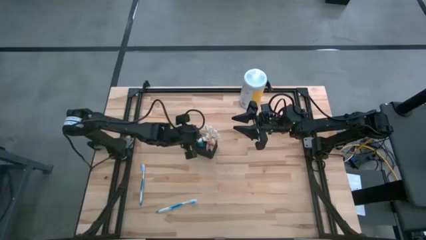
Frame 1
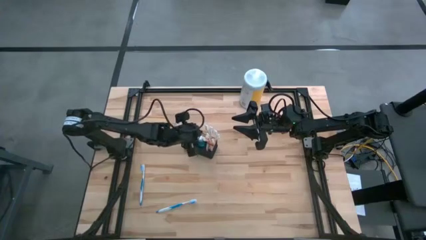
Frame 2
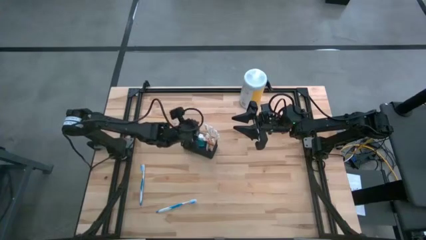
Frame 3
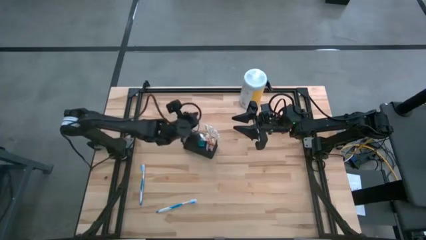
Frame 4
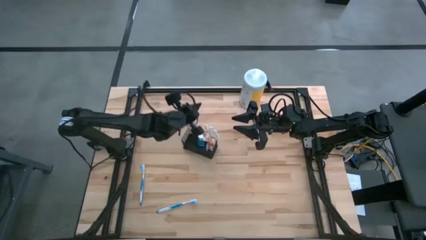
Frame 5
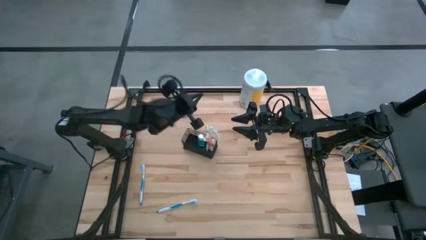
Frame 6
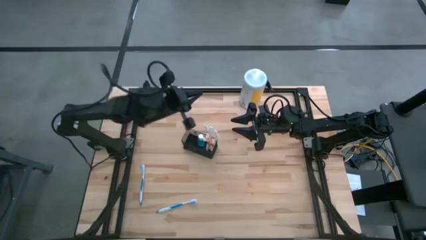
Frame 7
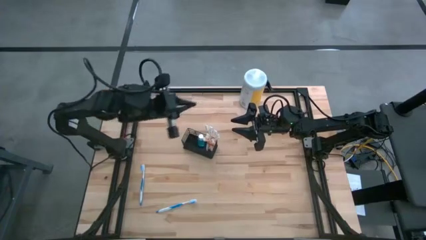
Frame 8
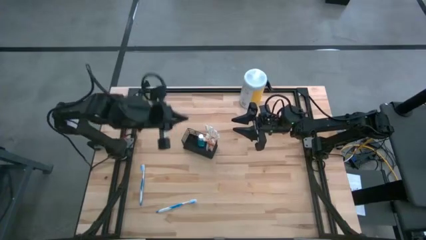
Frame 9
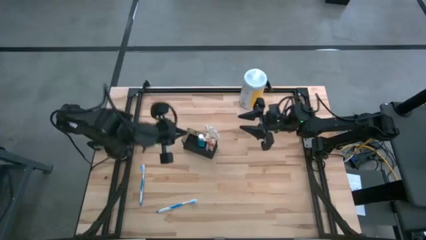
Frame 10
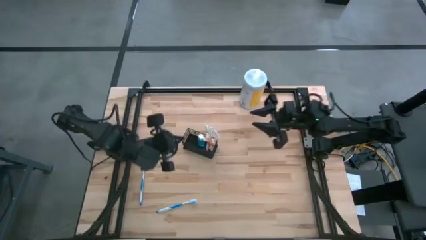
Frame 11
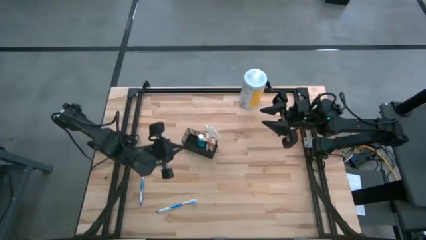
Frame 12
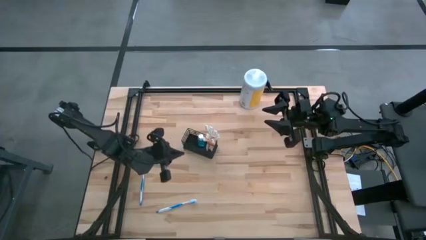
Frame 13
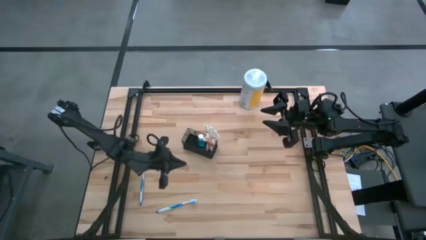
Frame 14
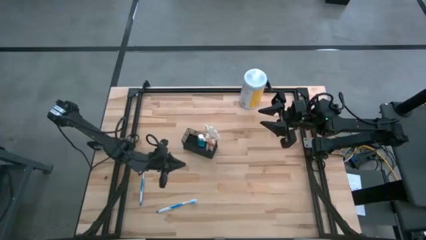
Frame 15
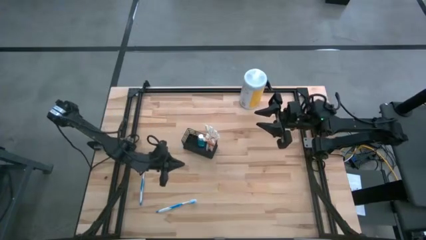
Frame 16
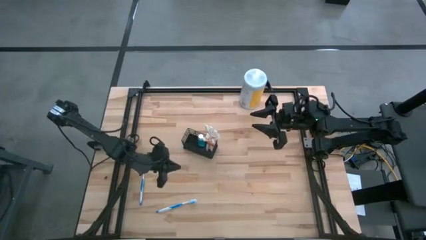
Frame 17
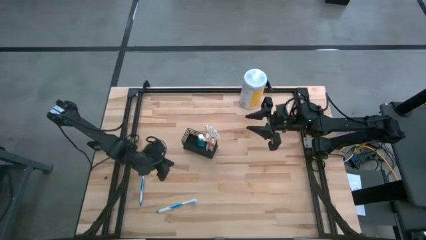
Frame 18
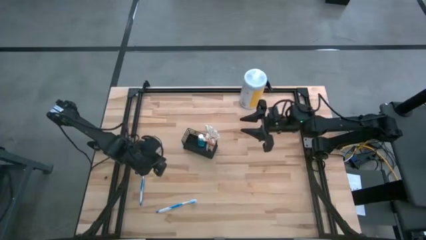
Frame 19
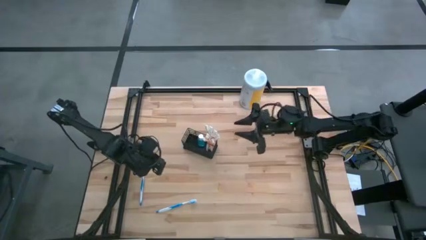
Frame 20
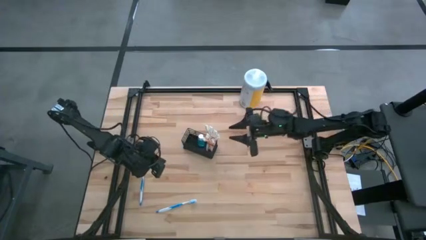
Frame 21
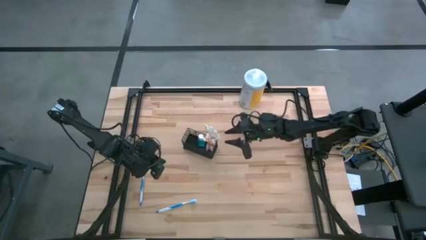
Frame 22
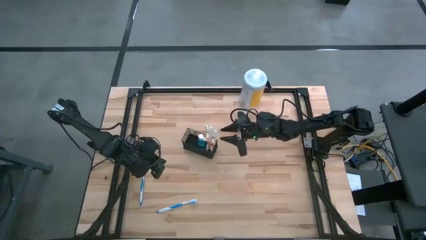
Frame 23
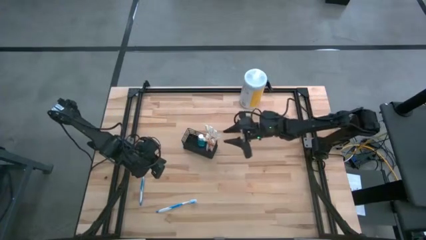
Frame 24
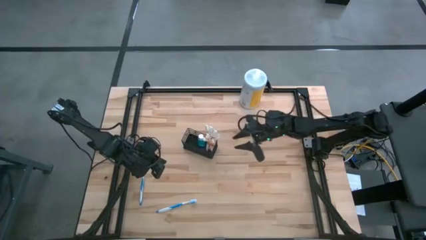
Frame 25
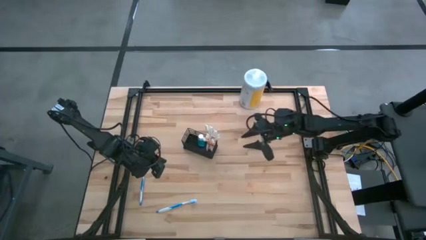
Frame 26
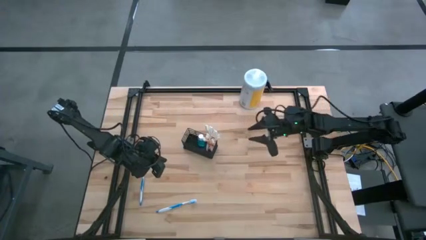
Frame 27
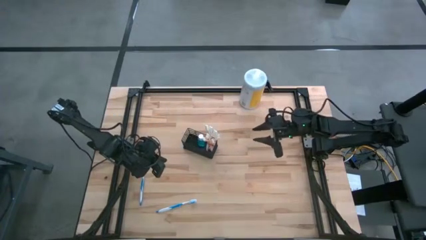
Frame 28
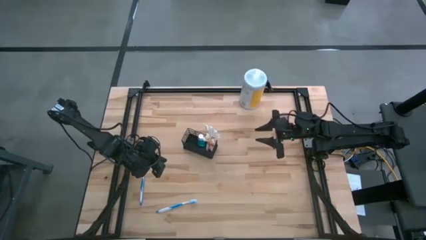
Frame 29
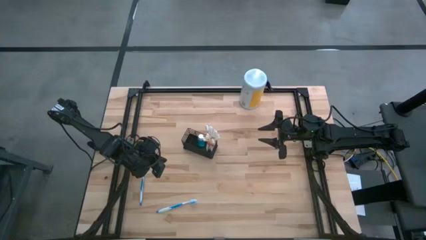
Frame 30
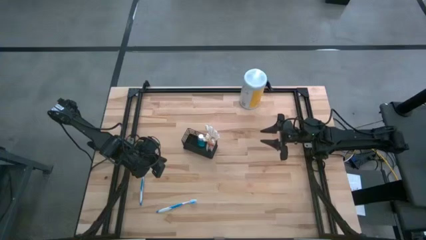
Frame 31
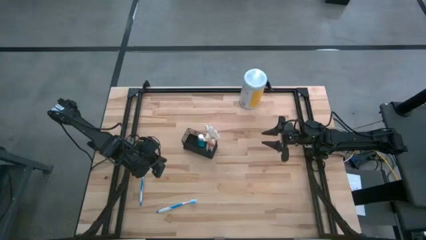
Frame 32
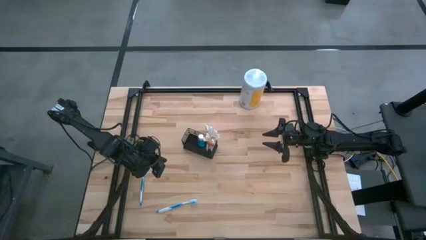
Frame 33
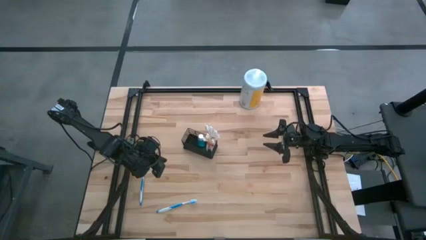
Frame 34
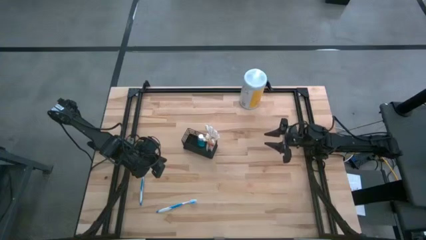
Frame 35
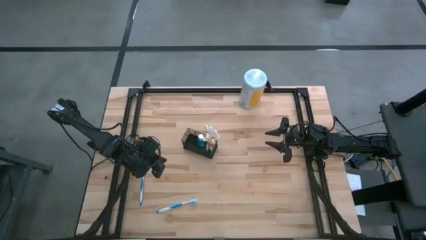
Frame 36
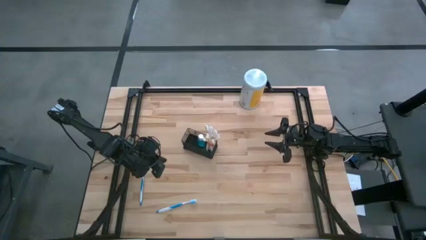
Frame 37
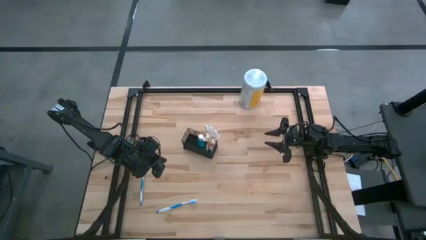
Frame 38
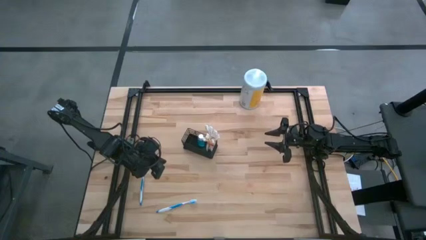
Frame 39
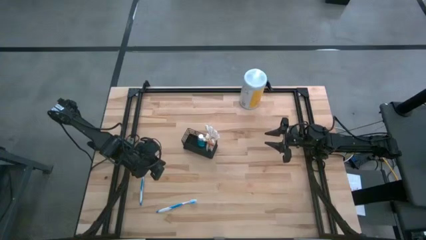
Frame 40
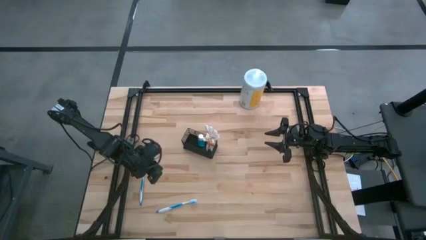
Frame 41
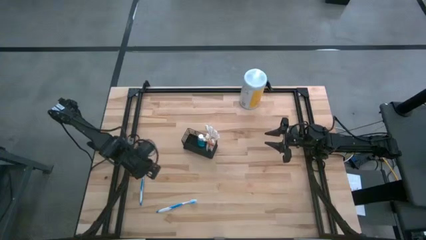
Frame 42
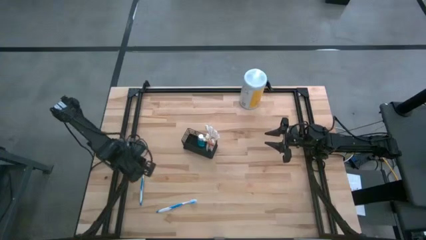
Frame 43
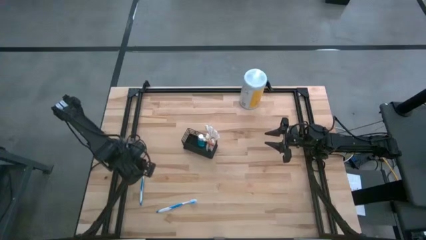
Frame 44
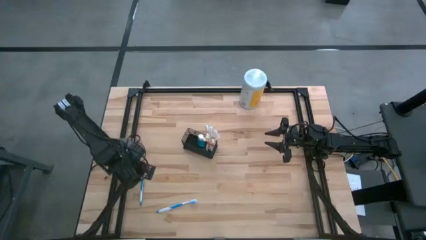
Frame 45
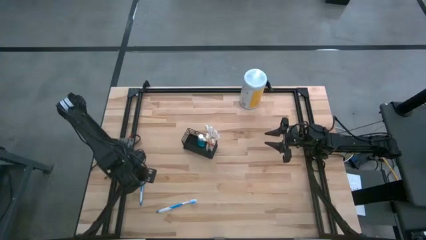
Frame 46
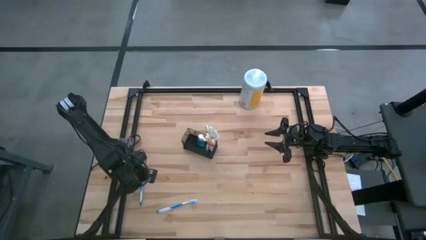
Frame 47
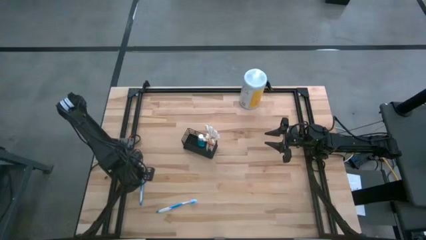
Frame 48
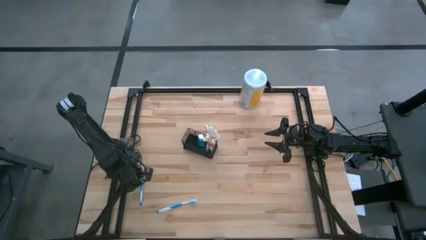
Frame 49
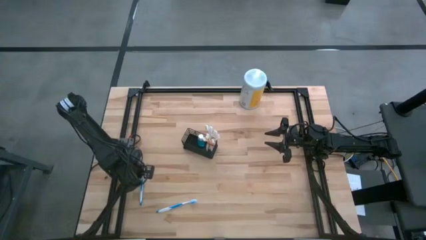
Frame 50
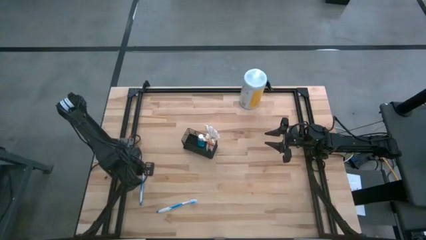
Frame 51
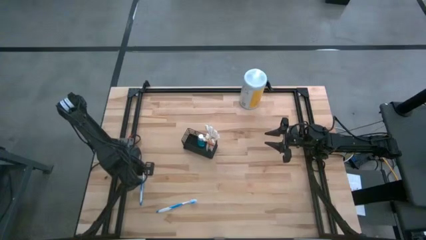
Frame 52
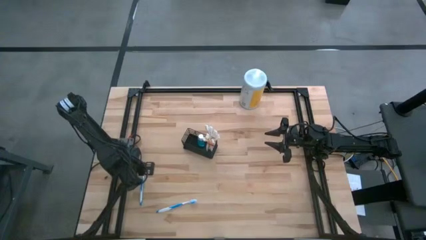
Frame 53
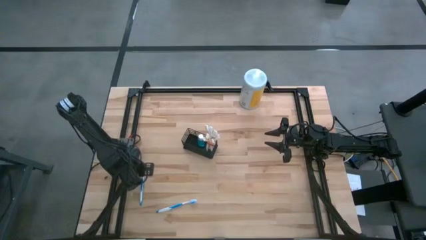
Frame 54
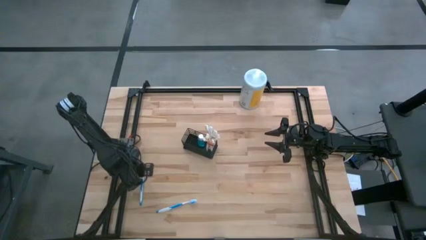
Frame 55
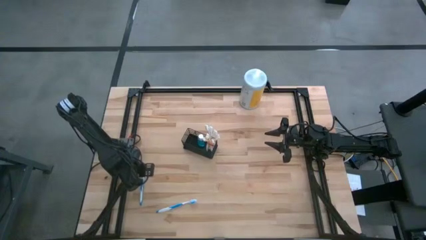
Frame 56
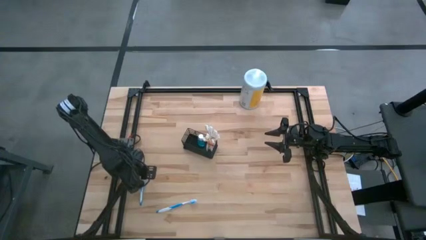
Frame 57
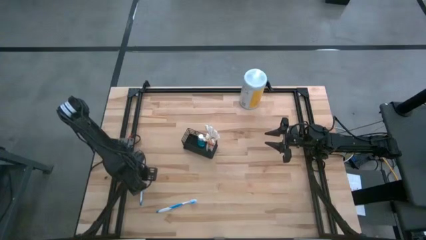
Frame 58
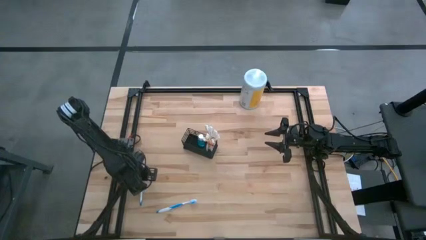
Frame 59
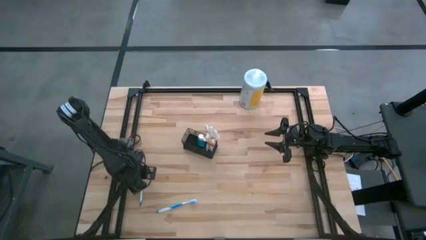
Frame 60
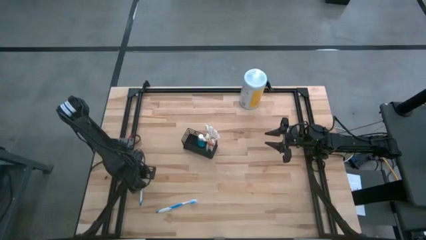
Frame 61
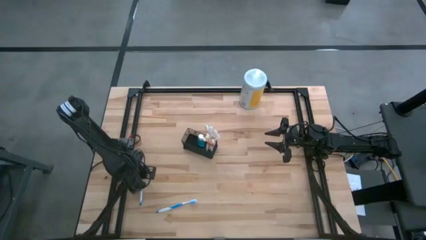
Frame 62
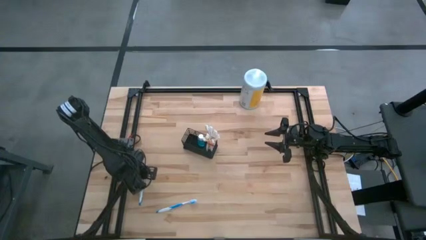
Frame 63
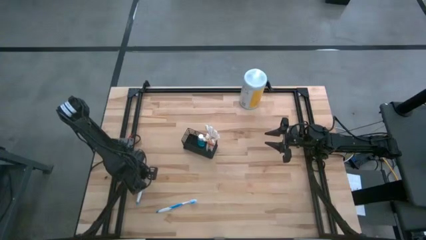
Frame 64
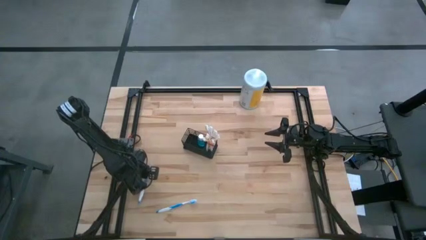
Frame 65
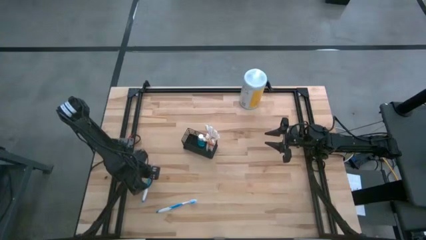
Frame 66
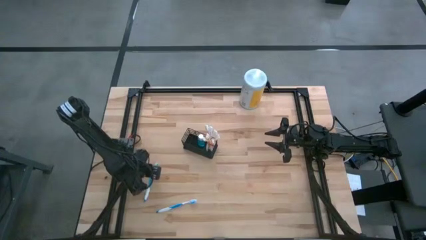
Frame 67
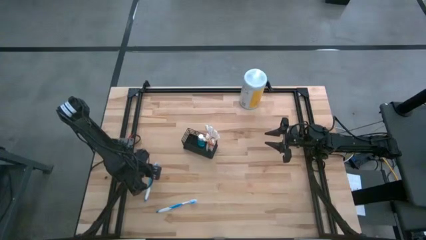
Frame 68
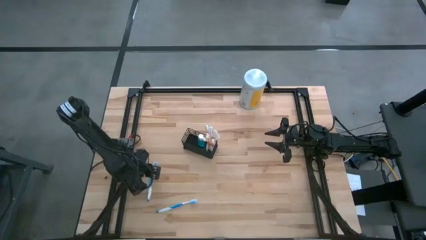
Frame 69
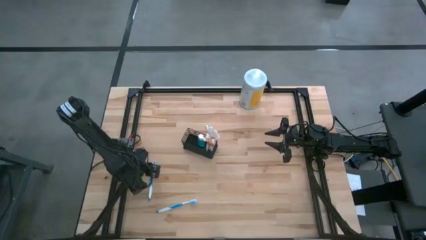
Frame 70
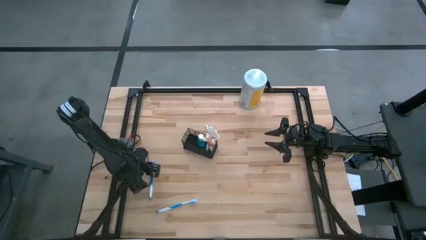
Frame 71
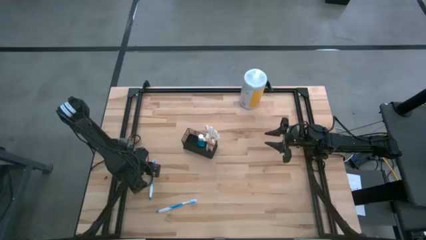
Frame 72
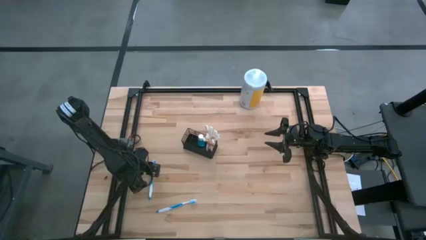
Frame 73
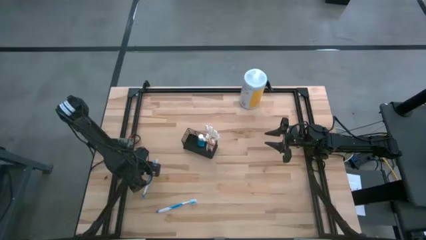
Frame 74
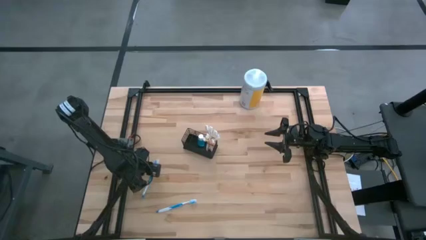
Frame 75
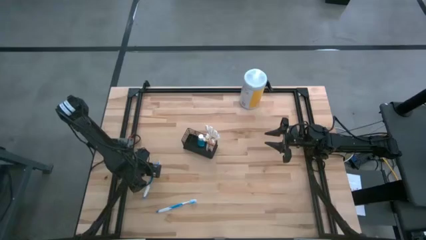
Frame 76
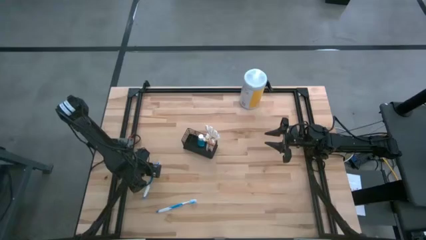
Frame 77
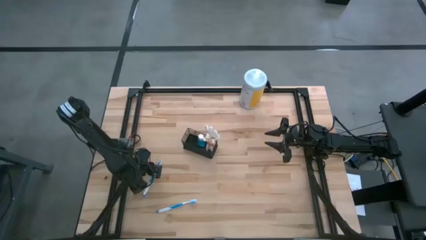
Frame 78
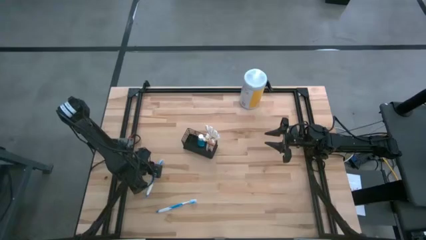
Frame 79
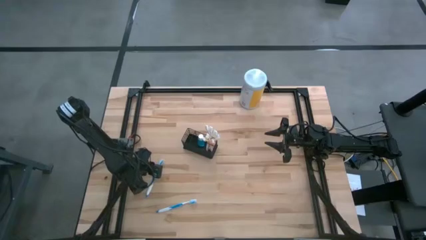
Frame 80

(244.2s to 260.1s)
Task: Pick & Place toothbrushing station
Put the blue toothbrush into the left section of the wire organizer
